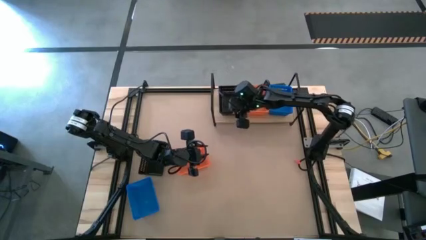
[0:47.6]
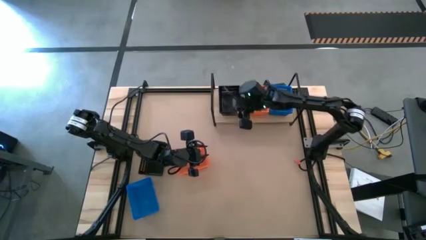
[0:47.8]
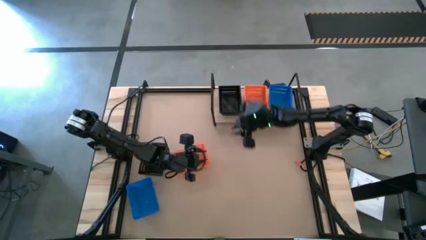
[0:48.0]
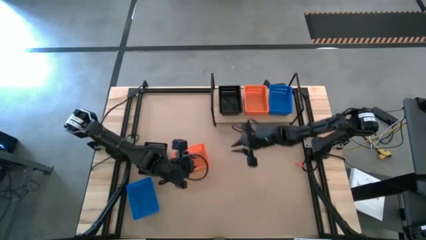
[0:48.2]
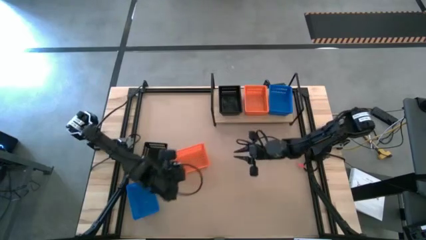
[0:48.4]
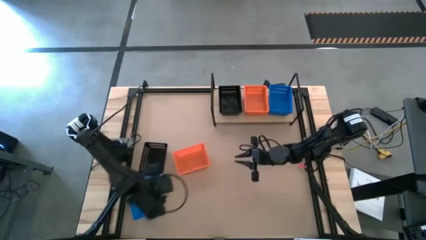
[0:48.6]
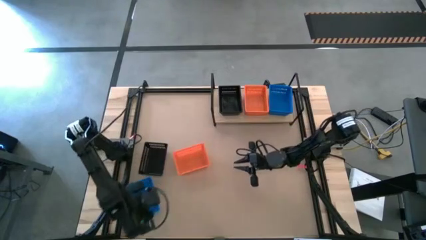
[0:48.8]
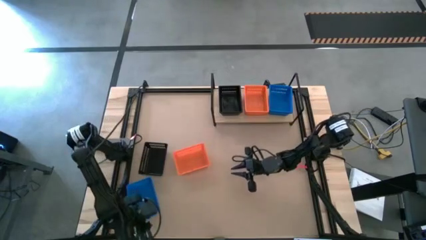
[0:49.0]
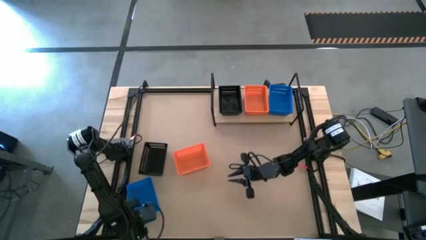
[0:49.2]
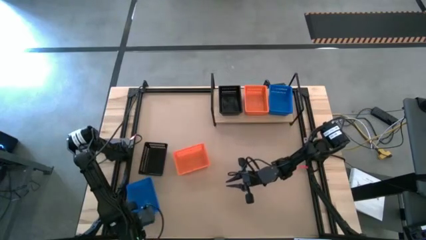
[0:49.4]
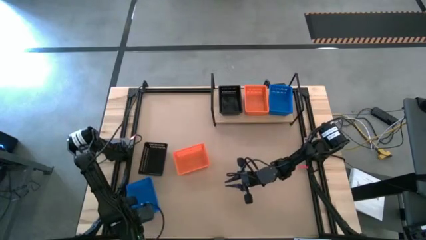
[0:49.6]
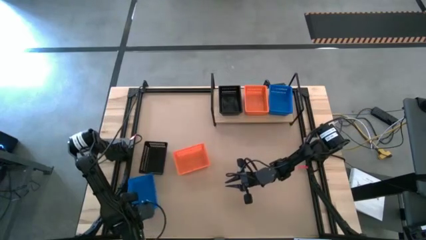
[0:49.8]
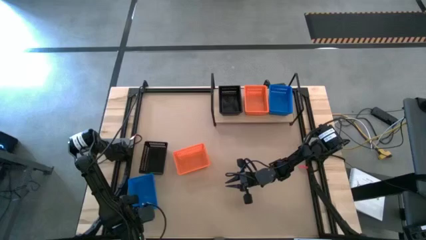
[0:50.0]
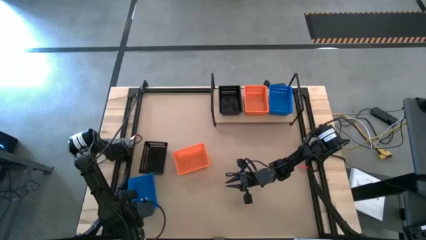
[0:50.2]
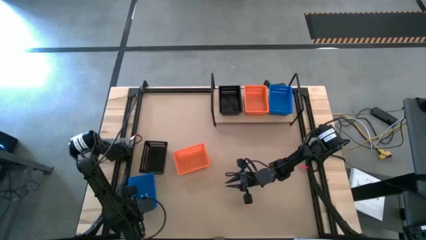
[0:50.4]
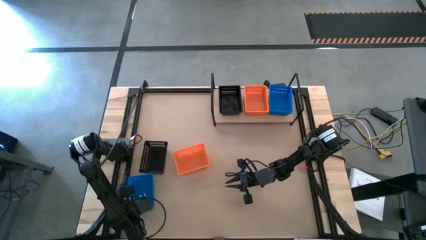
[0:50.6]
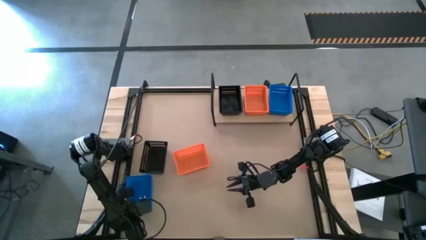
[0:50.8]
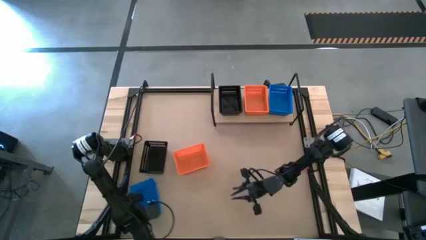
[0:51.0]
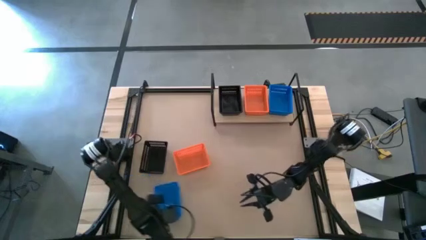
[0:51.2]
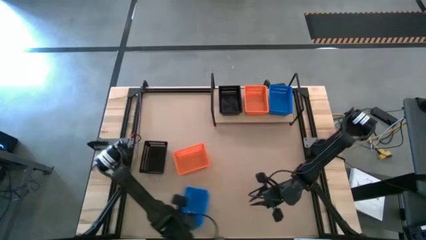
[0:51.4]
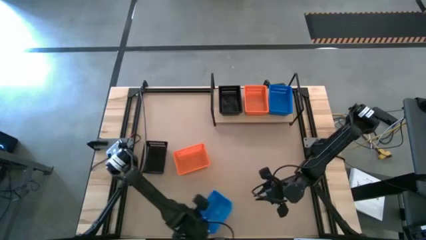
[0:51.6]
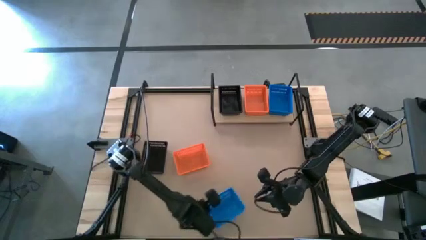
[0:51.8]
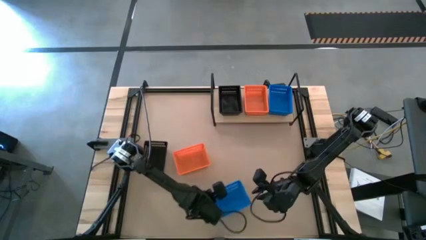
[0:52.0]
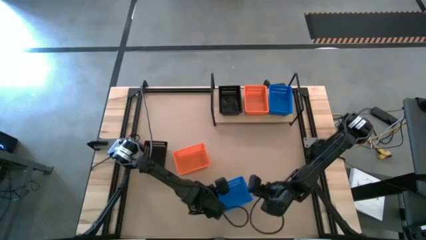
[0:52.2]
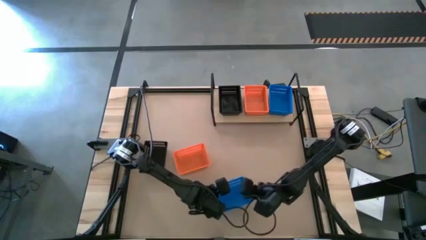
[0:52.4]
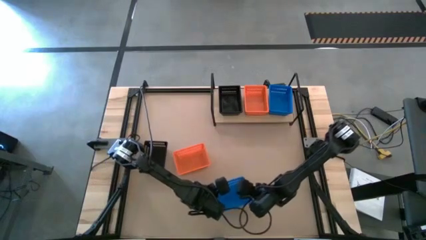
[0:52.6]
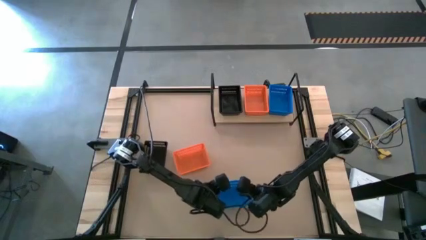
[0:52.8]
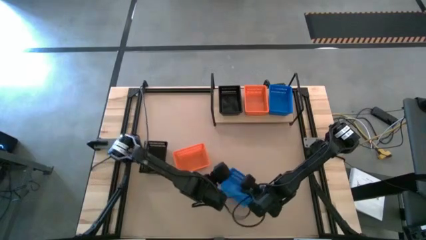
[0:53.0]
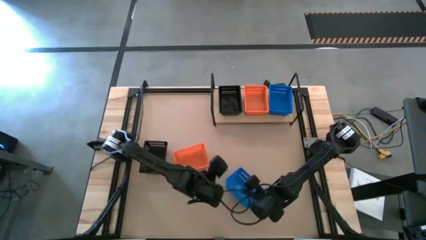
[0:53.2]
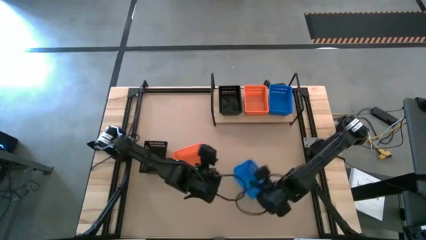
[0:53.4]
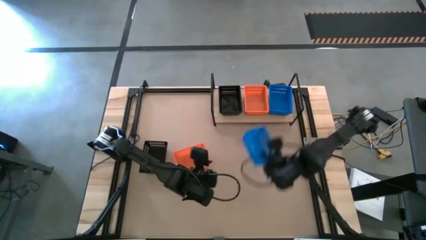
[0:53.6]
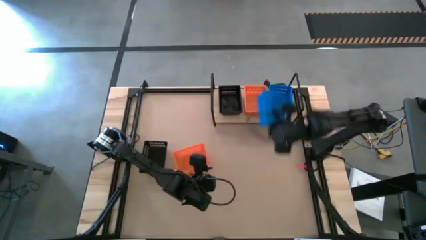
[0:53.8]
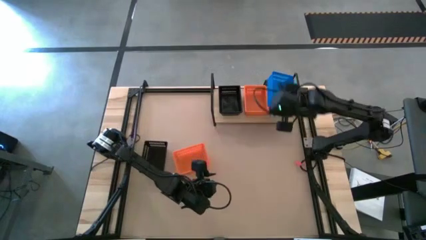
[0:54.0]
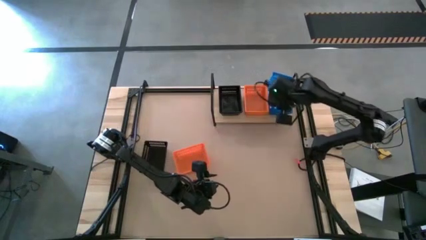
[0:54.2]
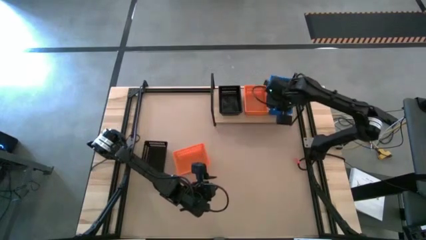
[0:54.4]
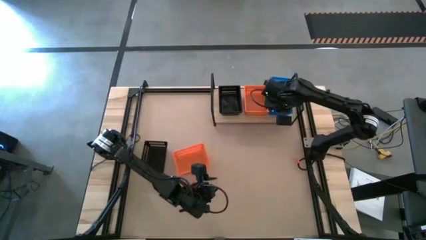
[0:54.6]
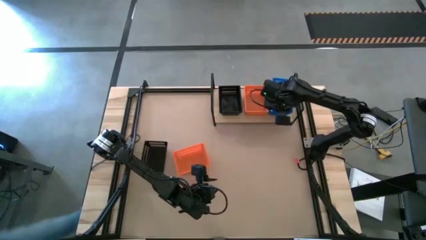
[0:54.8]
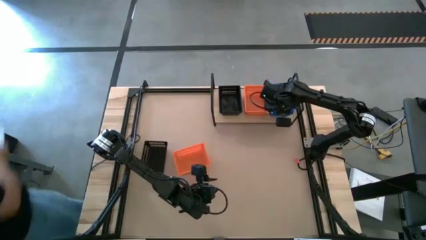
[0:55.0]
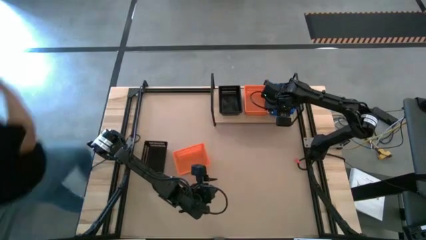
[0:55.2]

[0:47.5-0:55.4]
Task: Stack baskets on shelf by color
Stack the blue bin on the blue bins on the shelf

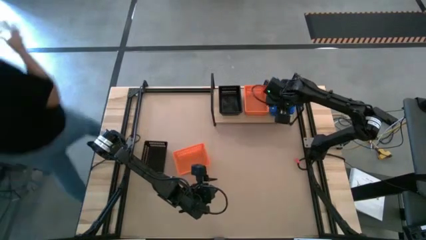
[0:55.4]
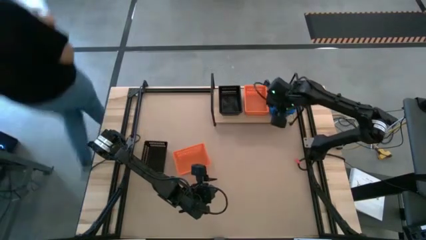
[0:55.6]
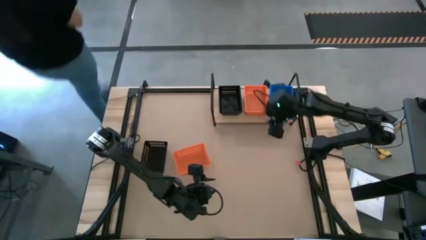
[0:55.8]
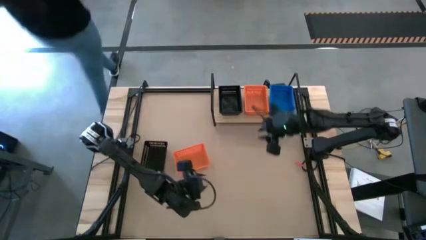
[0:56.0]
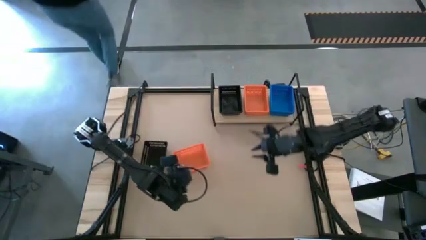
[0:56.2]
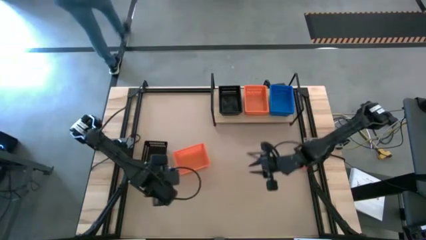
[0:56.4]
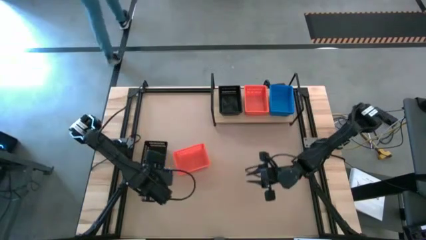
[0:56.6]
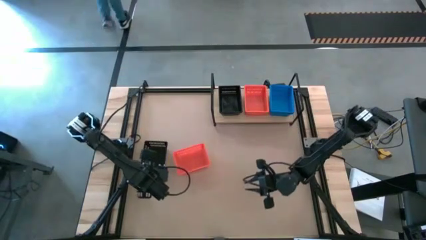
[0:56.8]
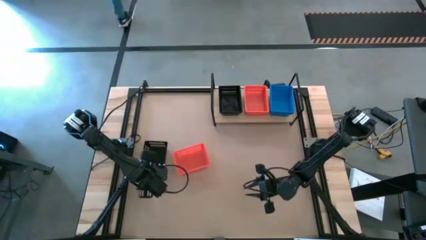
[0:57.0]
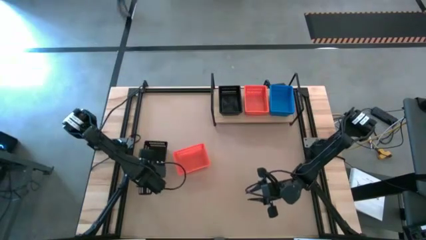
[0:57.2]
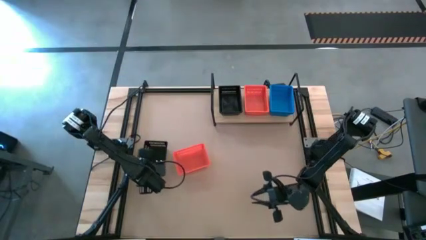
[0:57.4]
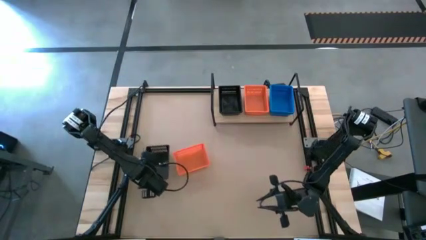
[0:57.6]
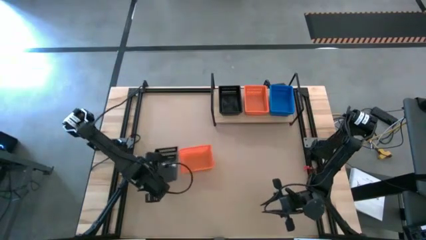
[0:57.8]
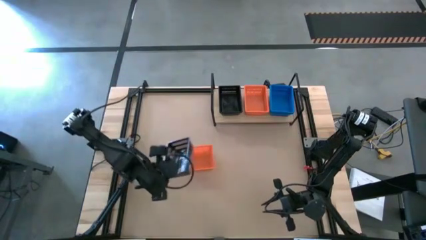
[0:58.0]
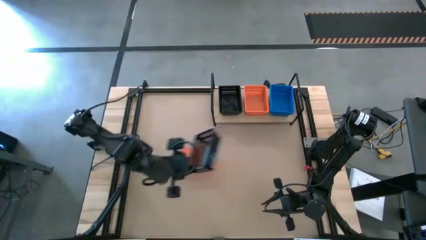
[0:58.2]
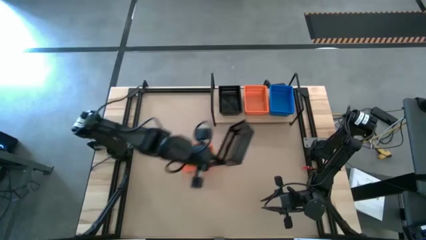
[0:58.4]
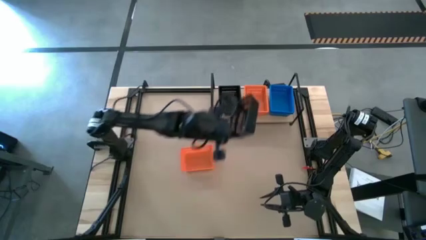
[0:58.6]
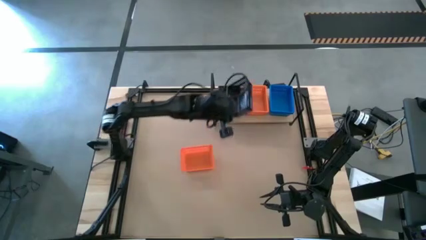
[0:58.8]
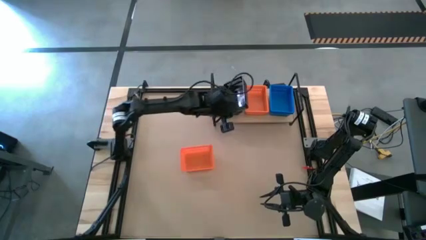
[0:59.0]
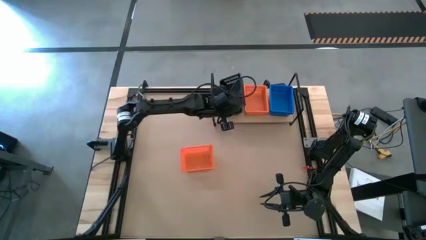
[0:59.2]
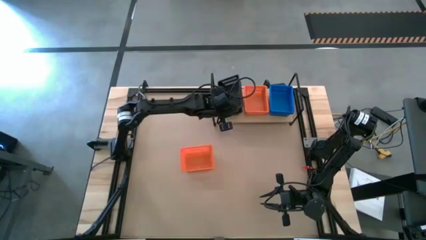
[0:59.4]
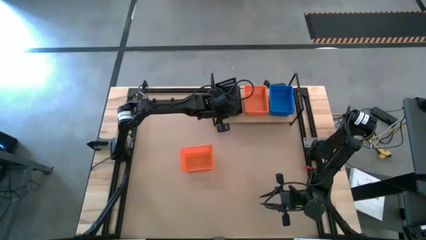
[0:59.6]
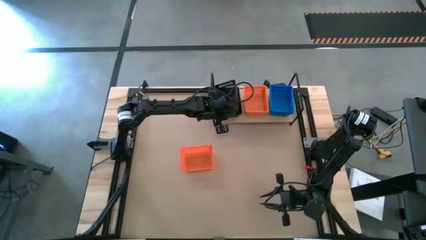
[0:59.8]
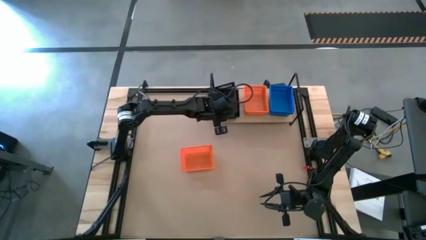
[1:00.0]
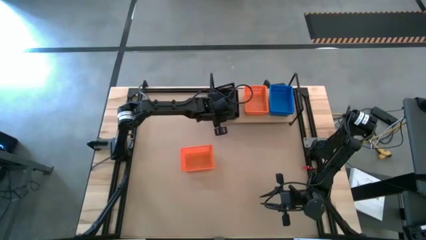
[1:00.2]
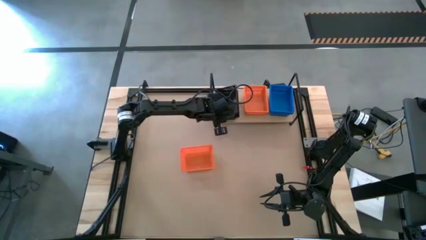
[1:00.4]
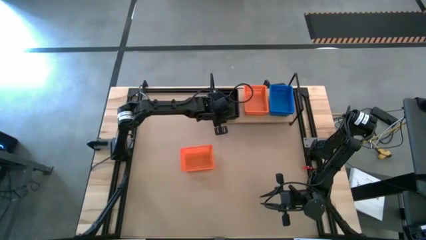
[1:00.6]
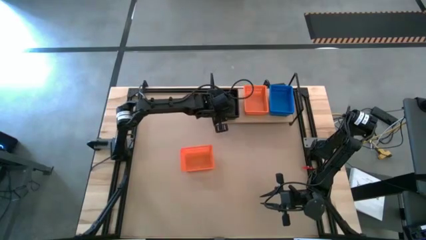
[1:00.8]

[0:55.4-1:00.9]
Stack the black bin on the black bins on the shelf

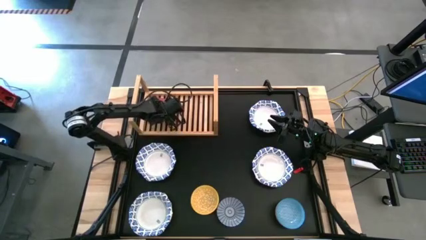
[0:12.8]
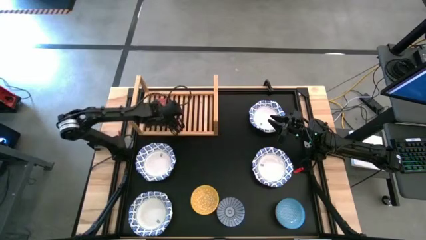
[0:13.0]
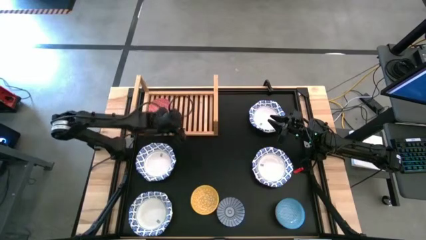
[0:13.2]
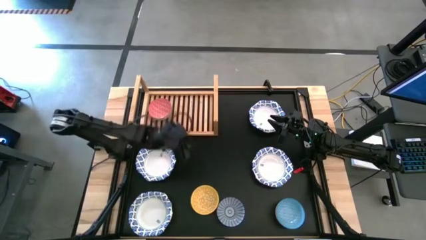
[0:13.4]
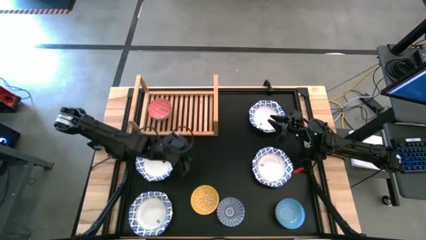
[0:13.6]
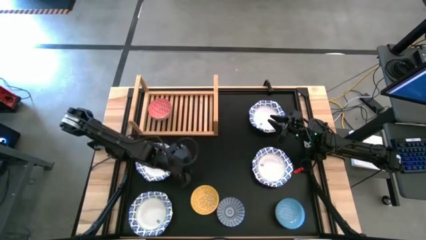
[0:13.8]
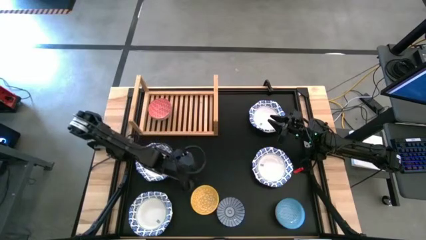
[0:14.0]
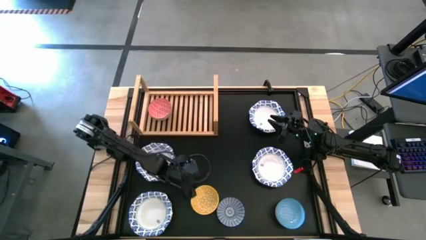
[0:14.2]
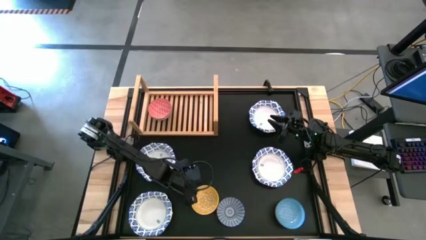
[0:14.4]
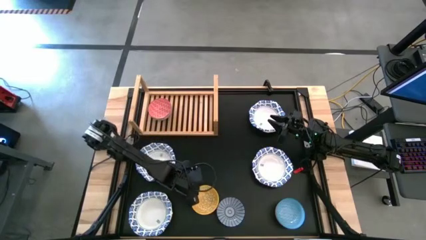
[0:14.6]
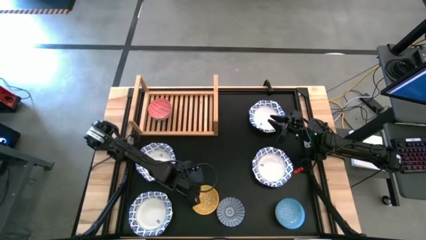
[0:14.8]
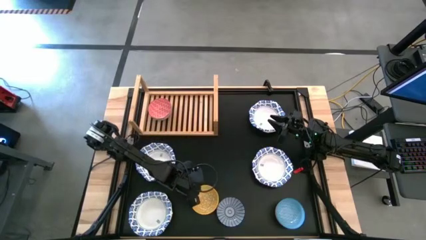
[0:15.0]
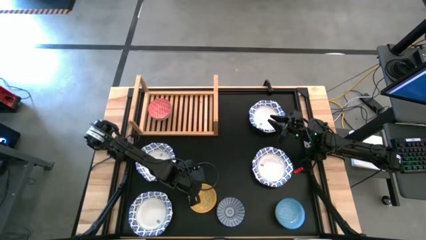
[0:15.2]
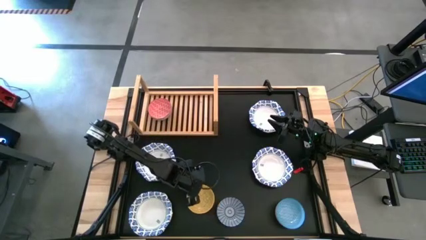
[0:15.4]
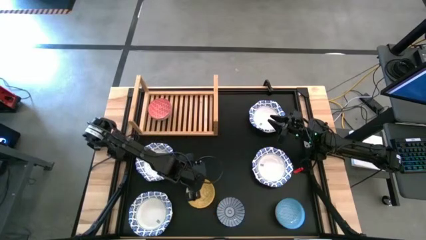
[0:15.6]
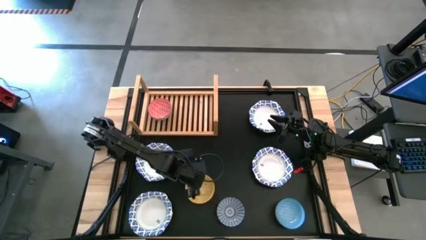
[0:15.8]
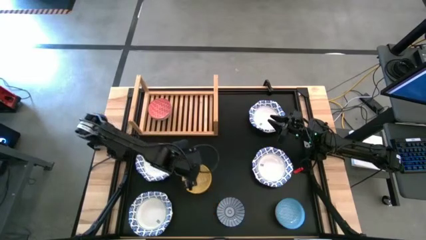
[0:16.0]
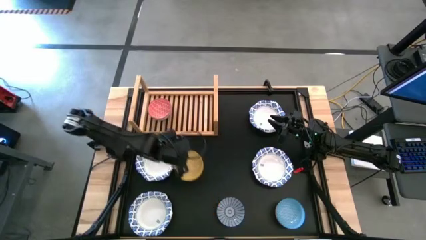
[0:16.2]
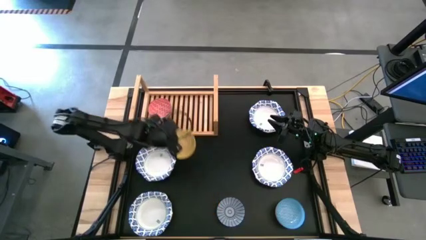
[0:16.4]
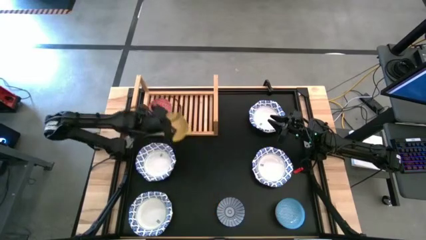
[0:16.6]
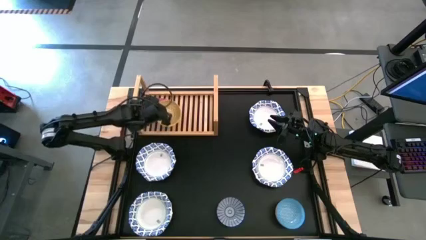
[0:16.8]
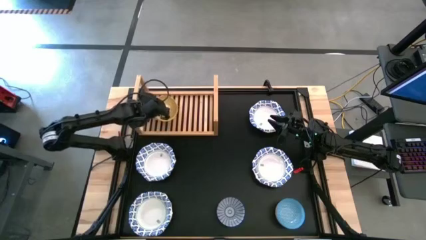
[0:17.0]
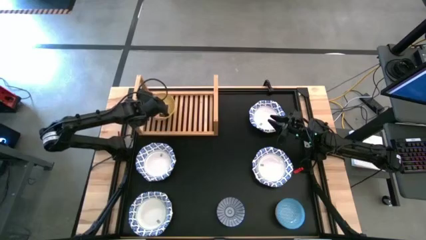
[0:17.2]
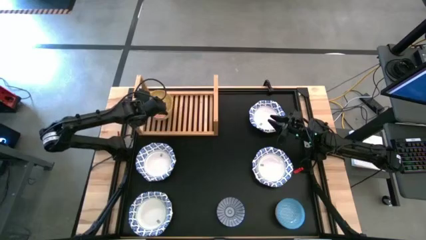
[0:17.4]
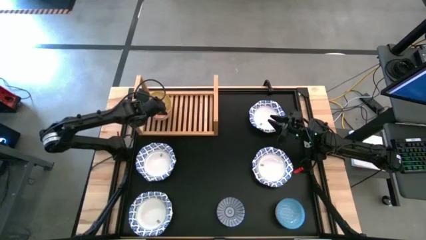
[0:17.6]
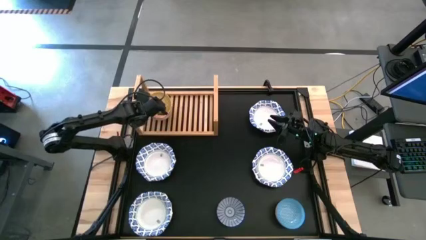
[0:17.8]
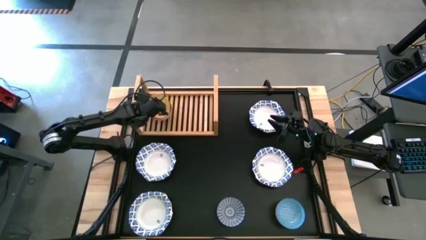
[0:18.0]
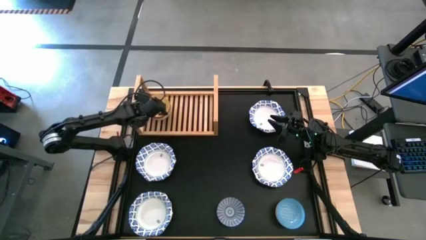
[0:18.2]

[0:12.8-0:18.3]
Task: Place and stack bowls onto a shelf
Stack the patterned yellow bowl on top of the patterned red bowl on the shelf
